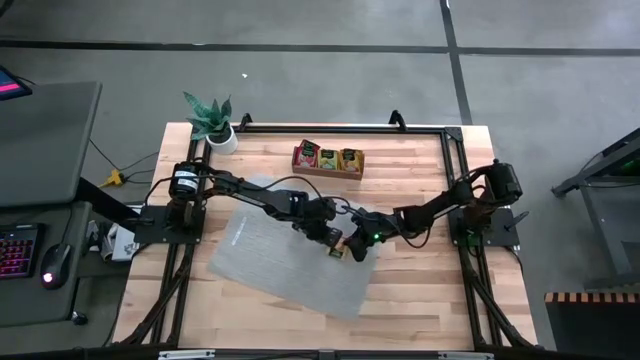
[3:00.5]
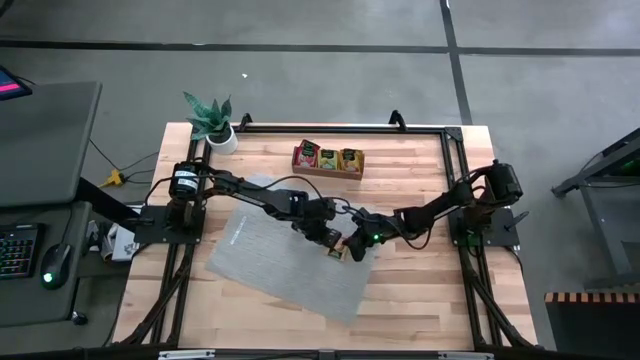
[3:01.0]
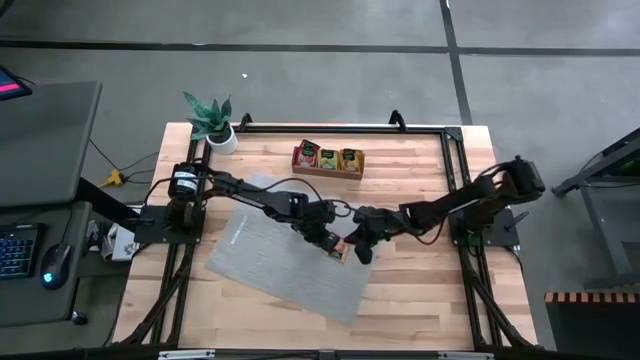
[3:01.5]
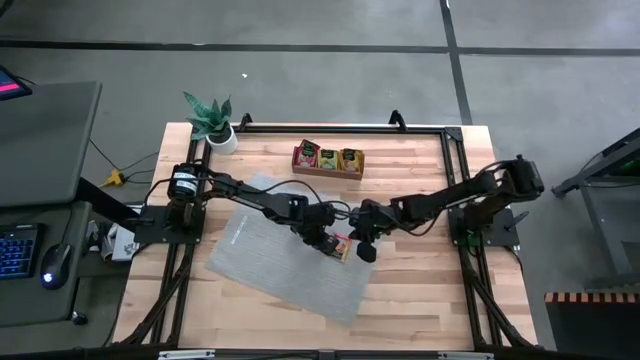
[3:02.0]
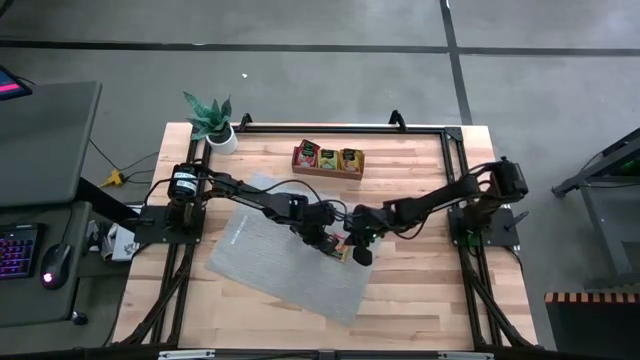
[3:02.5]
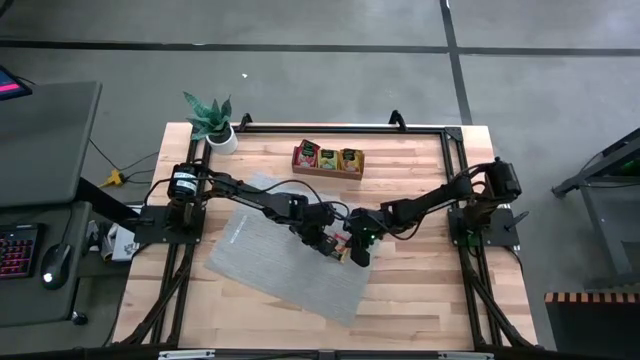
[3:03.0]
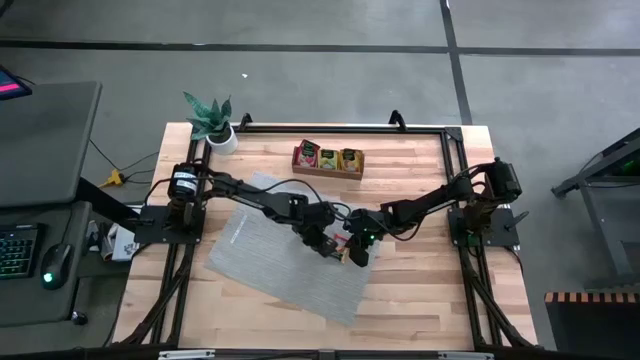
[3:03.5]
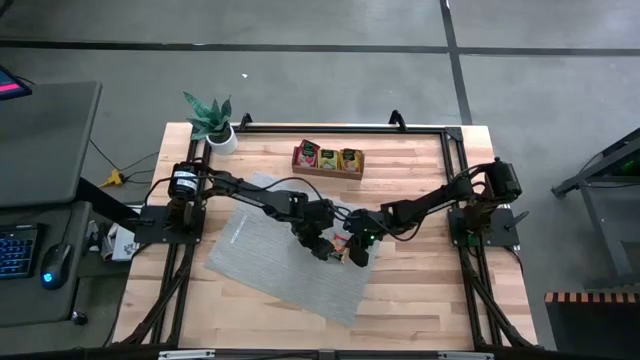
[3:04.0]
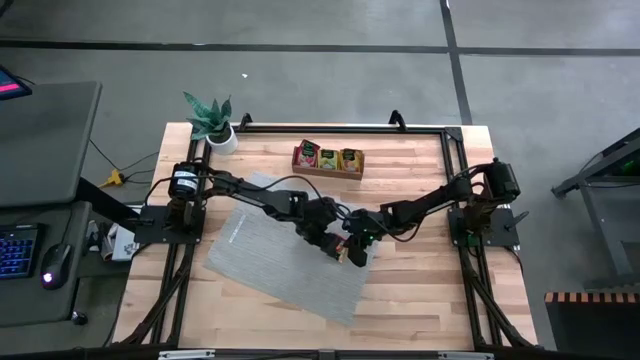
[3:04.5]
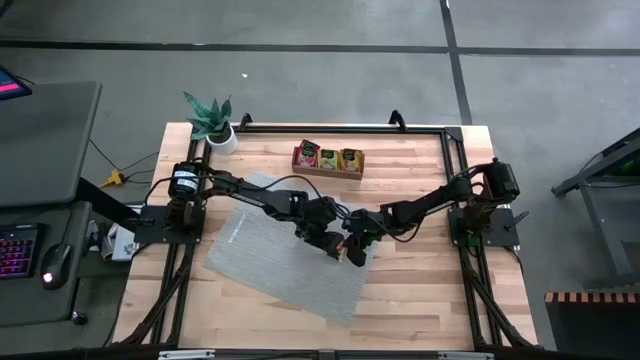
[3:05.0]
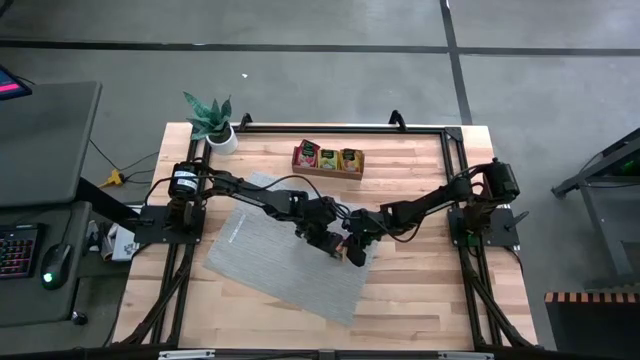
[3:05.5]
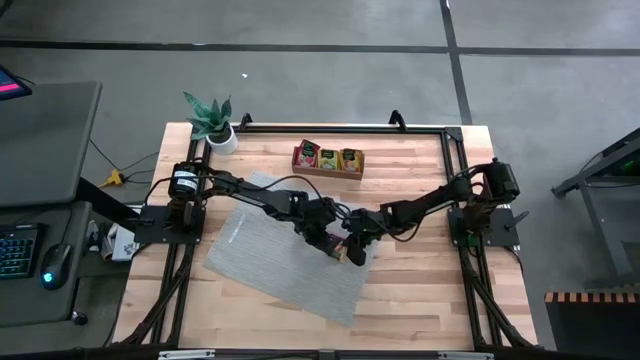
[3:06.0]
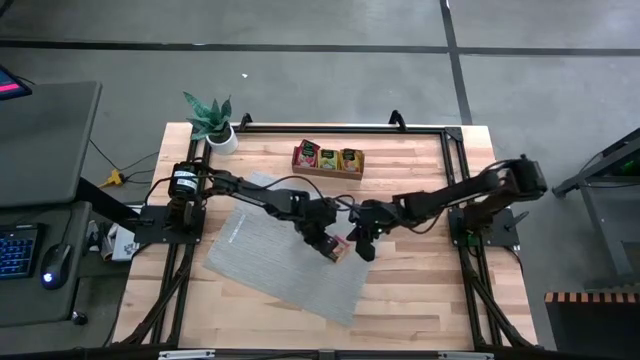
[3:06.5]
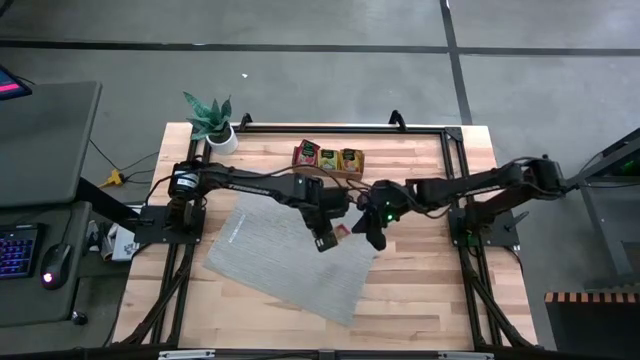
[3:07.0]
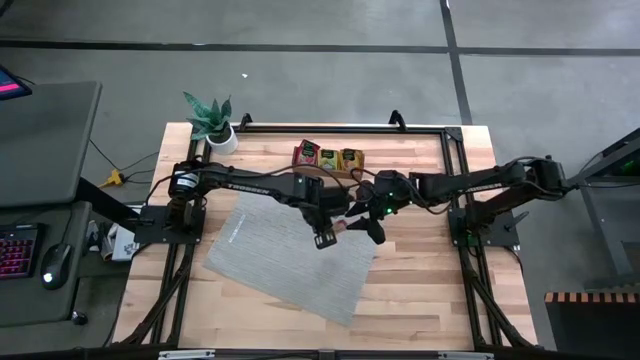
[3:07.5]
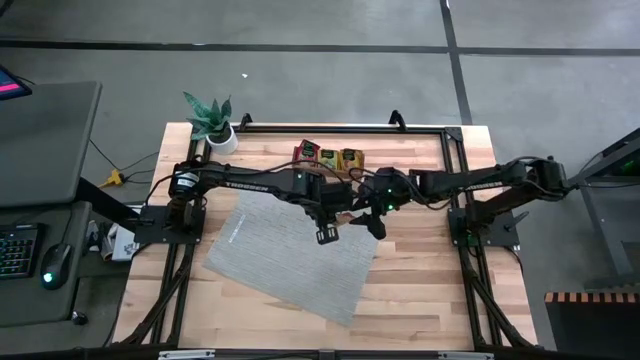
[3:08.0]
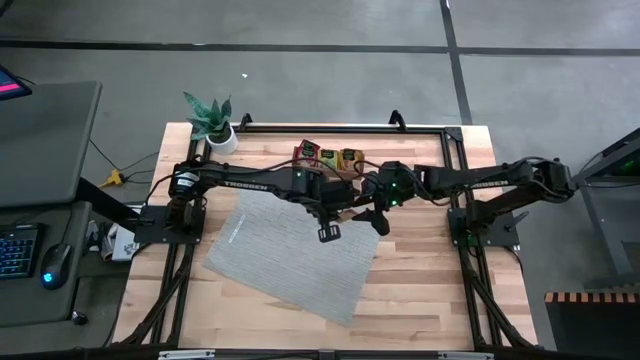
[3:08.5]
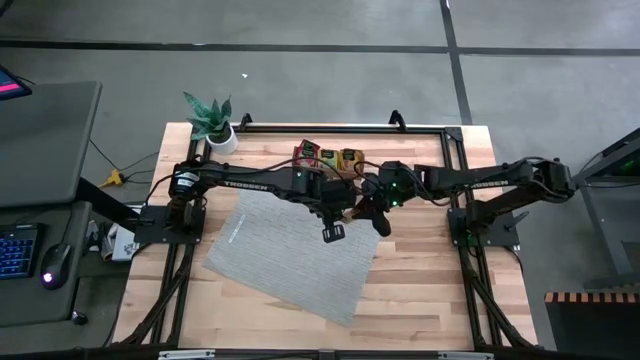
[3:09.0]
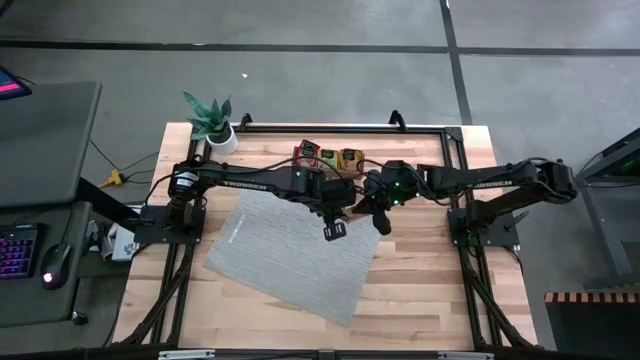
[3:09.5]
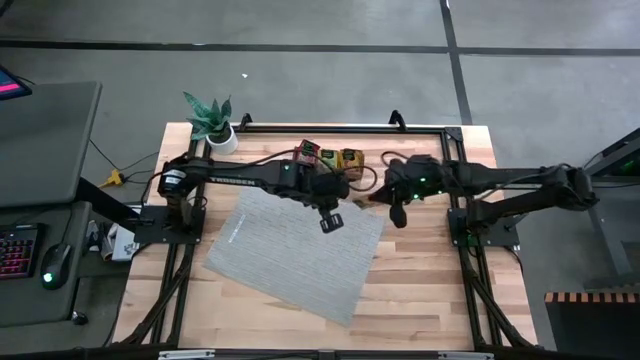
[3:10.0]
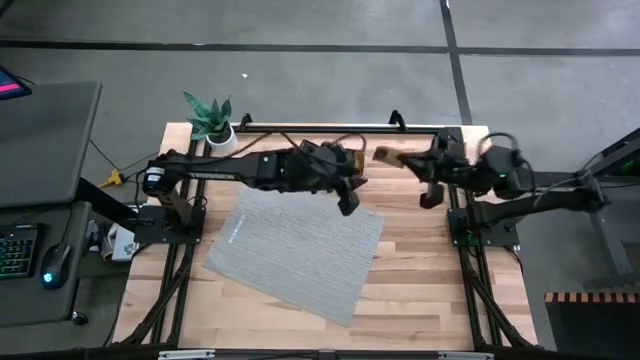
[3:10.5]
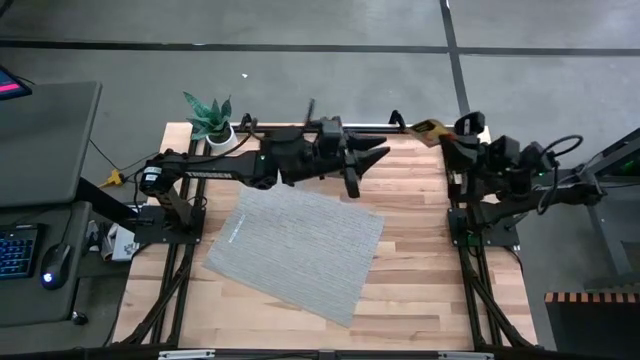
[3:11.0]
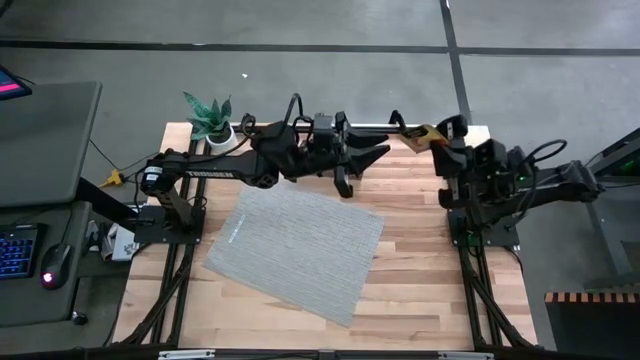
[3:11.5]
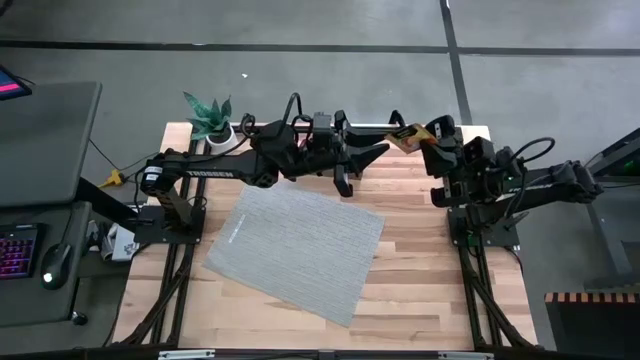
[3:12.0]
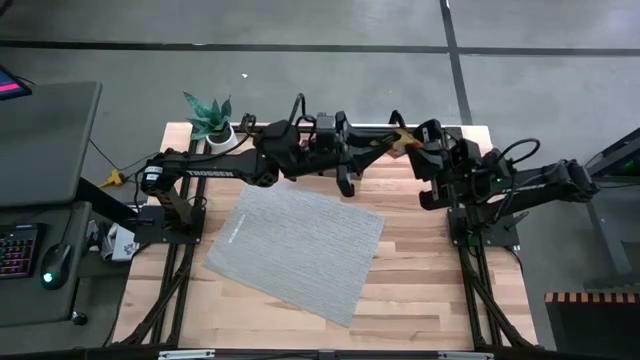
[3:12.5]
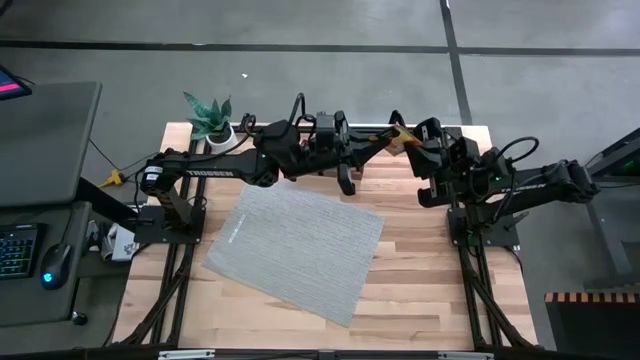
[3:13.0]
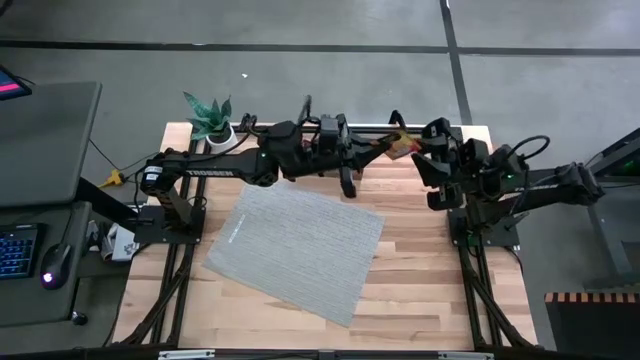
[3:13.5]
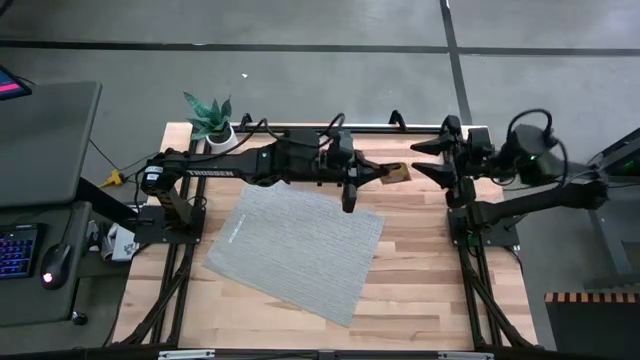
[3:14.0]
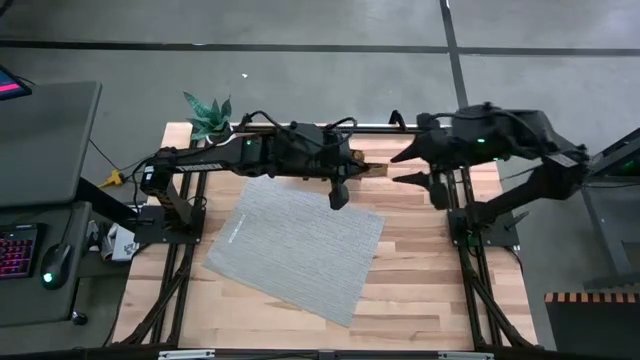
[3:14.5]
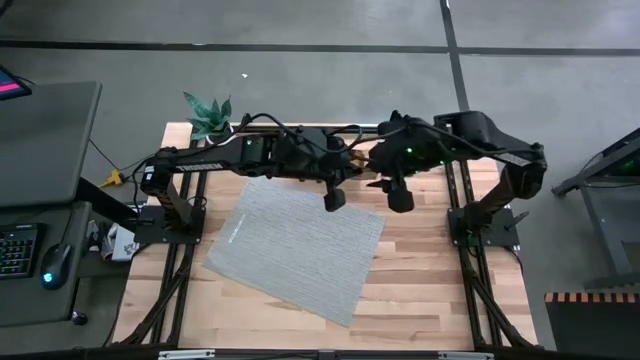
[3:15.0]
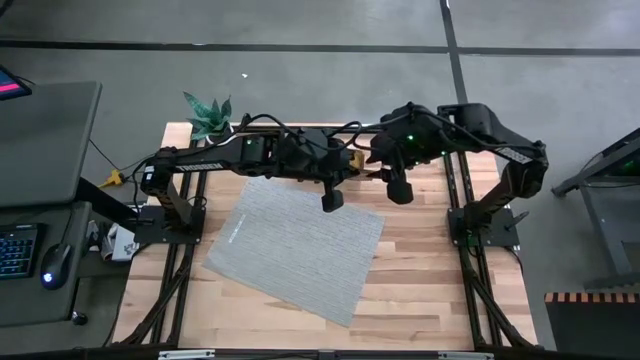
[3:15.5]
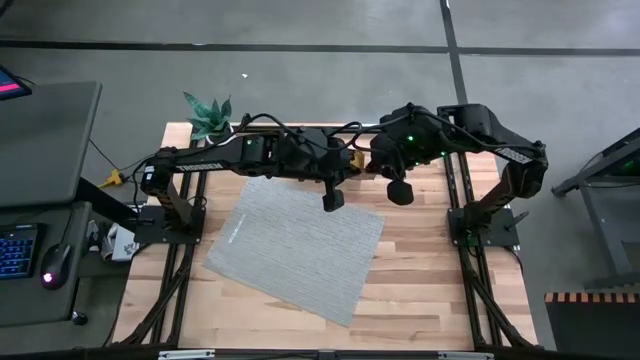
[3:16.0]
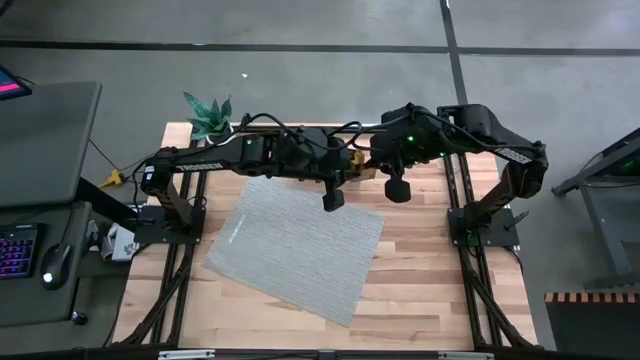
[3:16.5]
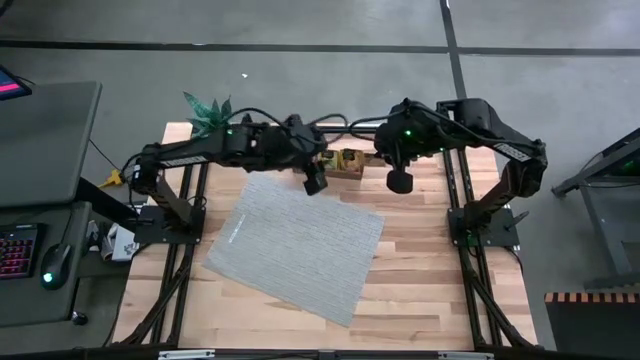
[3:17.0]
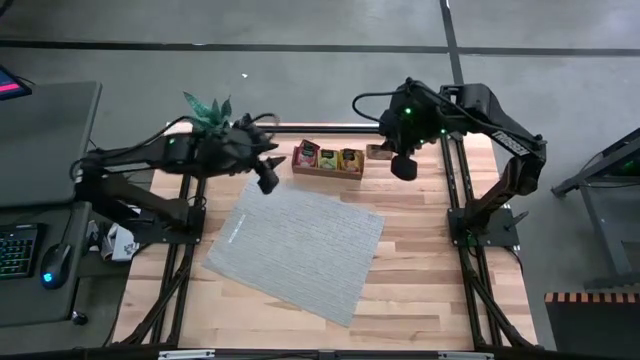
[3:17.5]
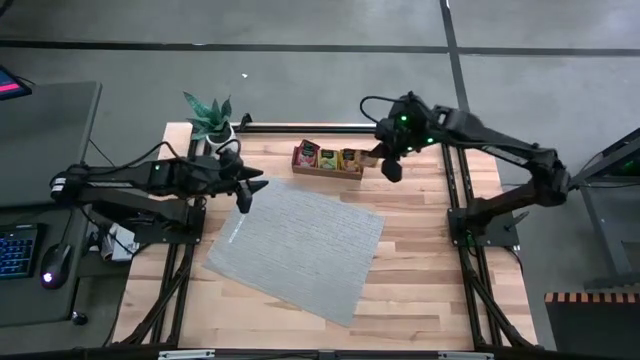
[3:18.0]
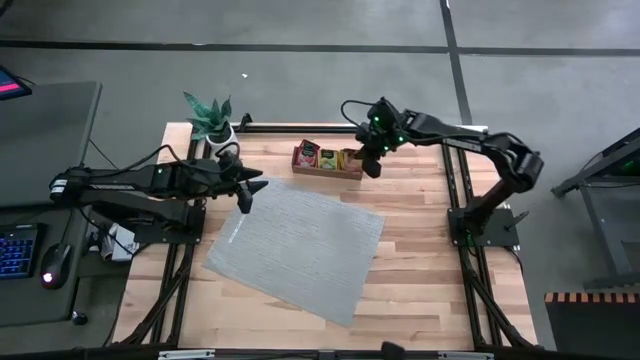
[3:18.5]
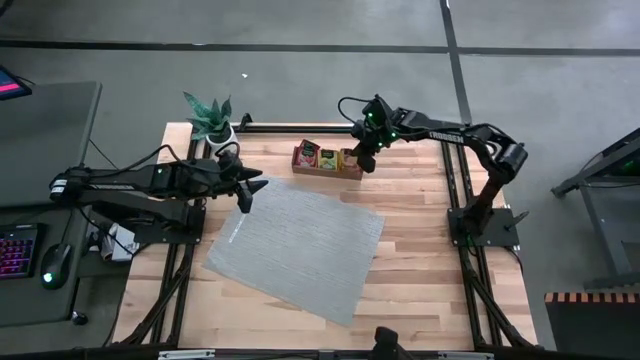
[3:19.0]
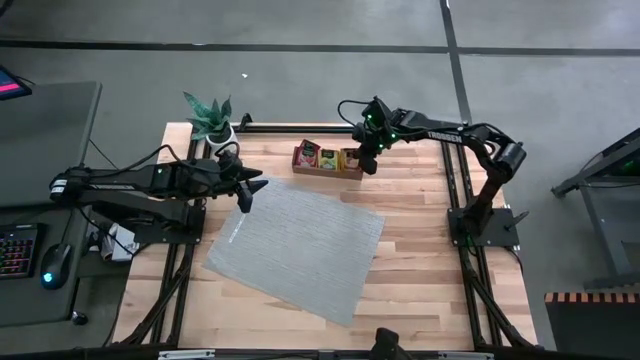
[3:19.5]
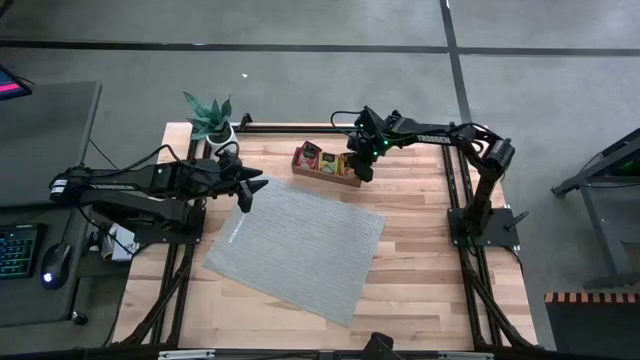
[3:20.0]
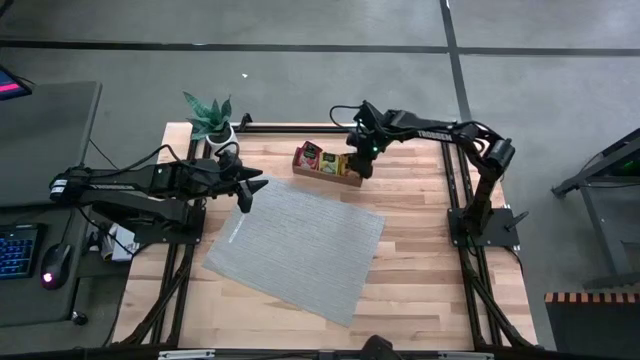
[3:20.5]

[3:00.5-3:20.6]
Task: Pick & Place Tea
Put the orange tea bag into the right section of the wooden organizer

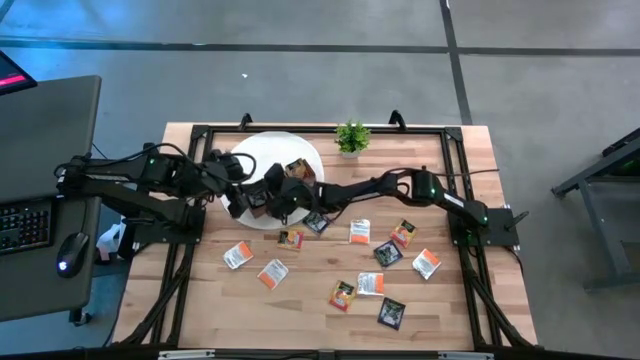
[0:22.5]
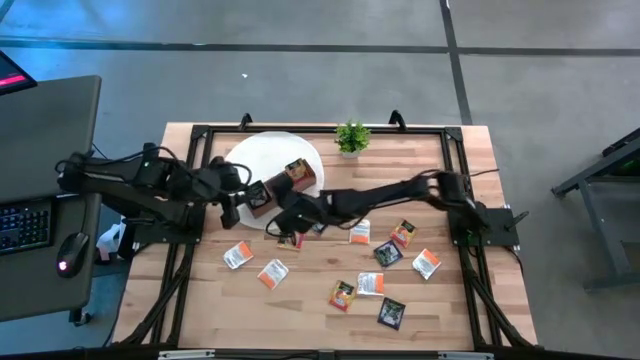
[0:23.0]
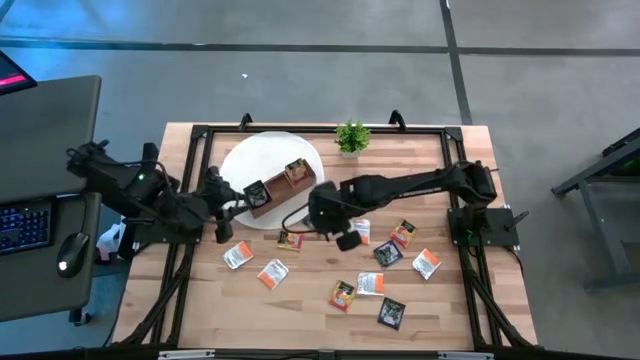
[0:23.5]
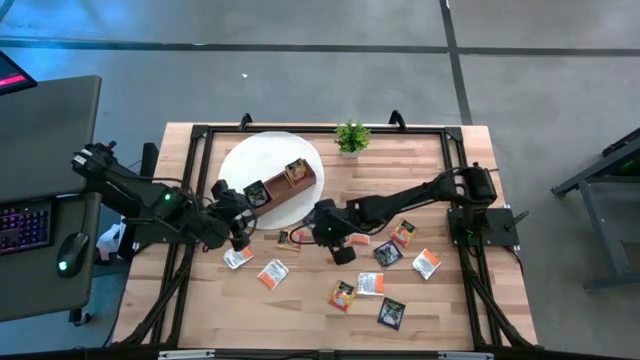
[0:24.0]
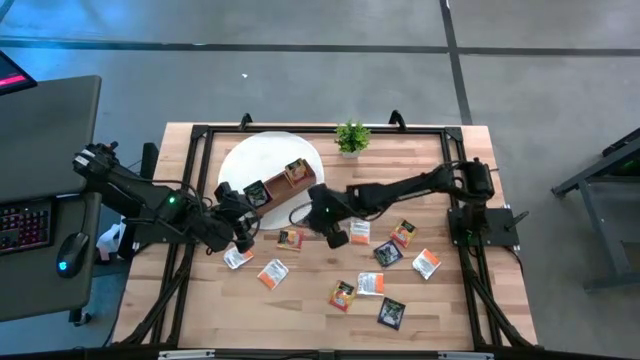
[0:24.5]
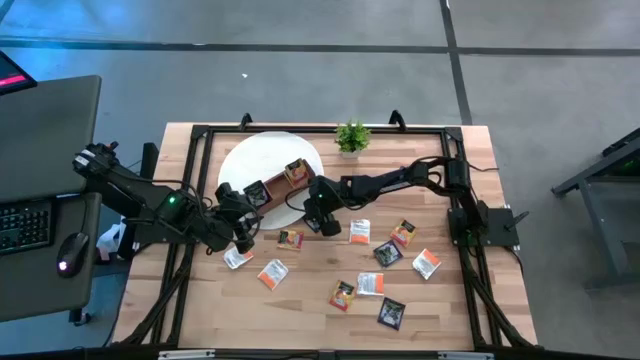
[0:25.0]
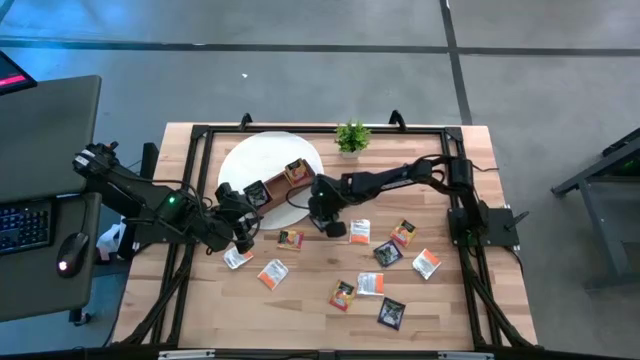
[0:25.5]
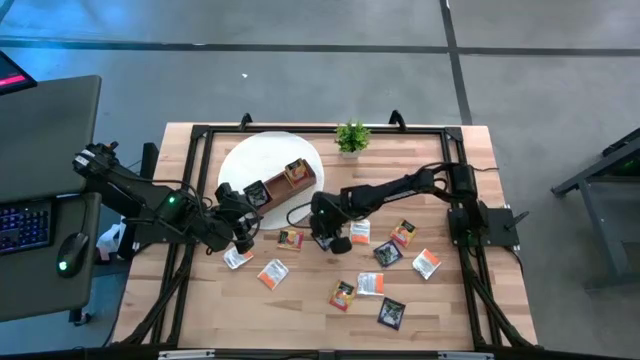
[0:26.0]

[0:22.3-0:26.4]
Task: Pick & Place Tea
Put the purple tea bag into the left section of the wooden organizer
